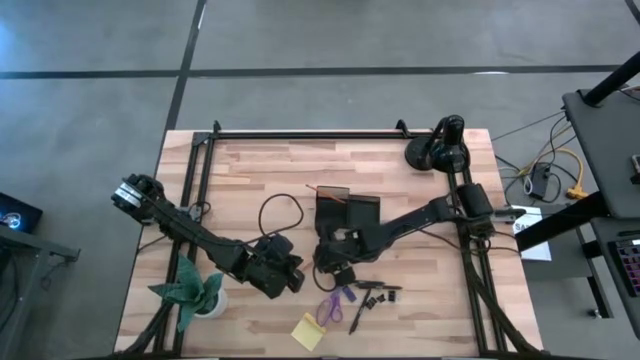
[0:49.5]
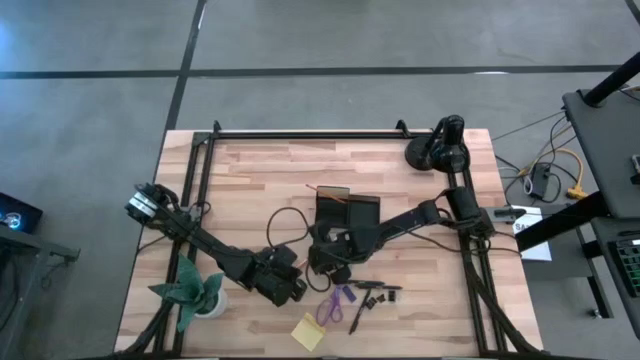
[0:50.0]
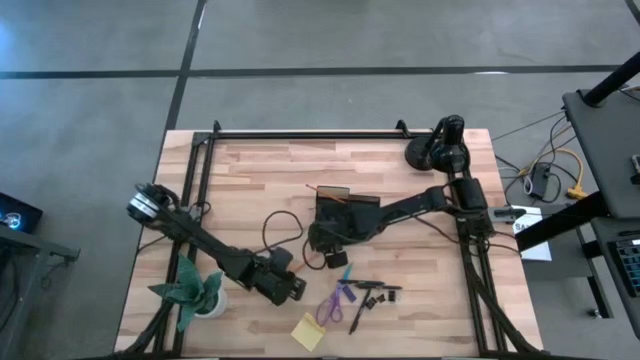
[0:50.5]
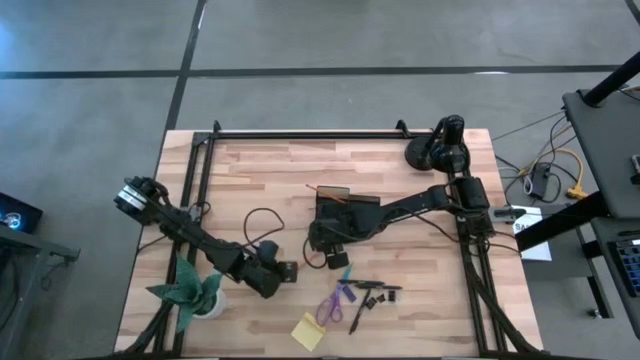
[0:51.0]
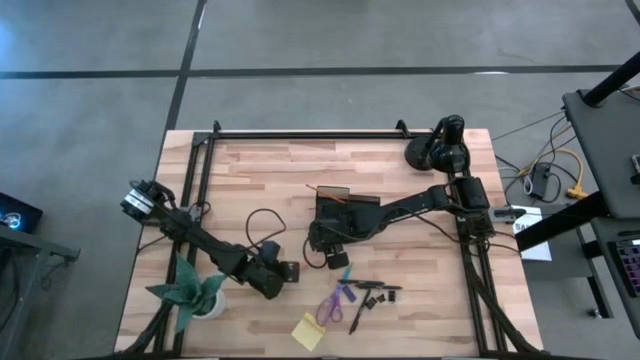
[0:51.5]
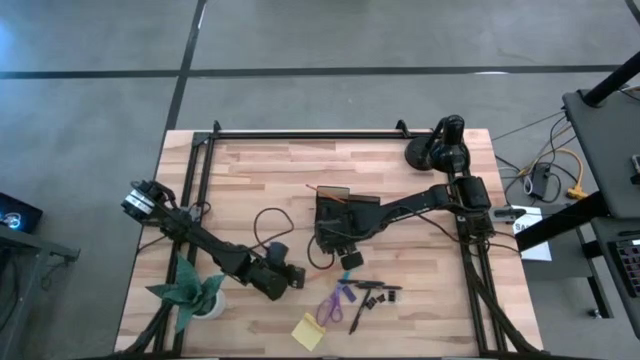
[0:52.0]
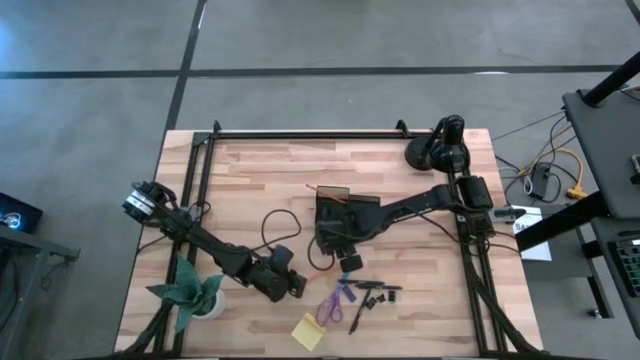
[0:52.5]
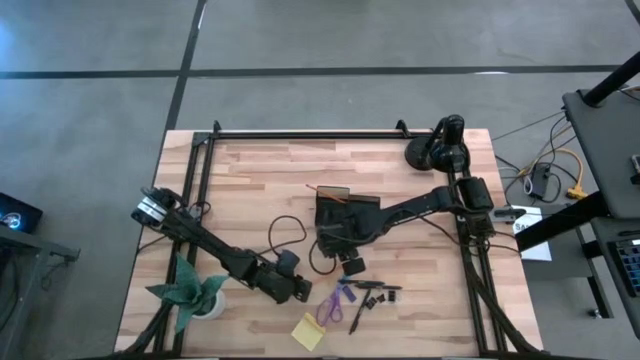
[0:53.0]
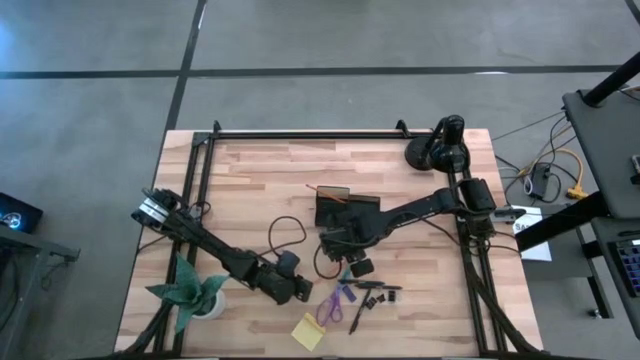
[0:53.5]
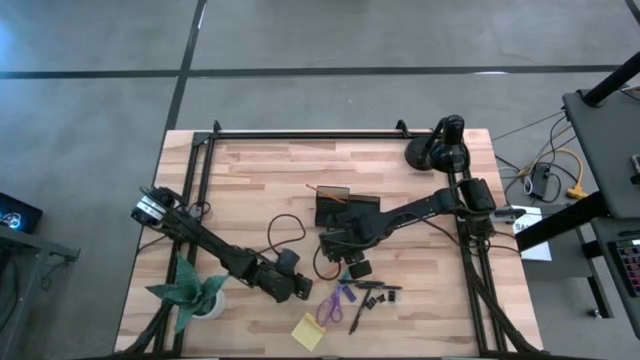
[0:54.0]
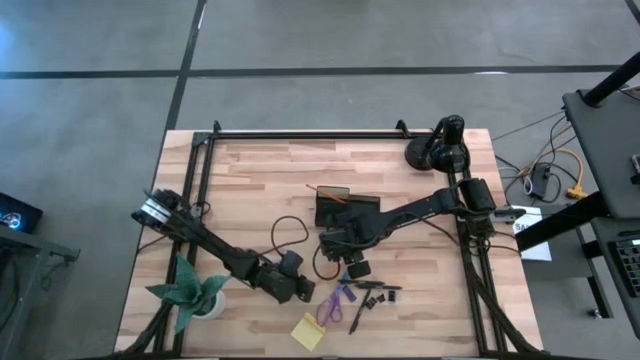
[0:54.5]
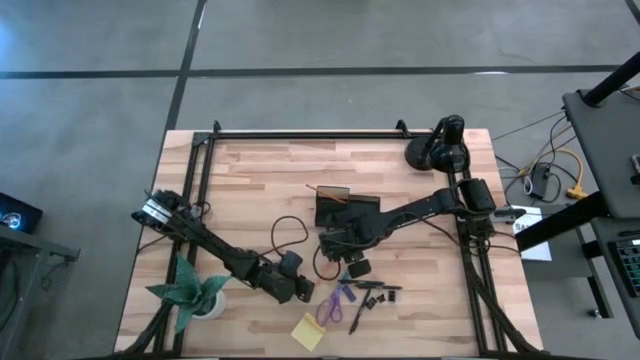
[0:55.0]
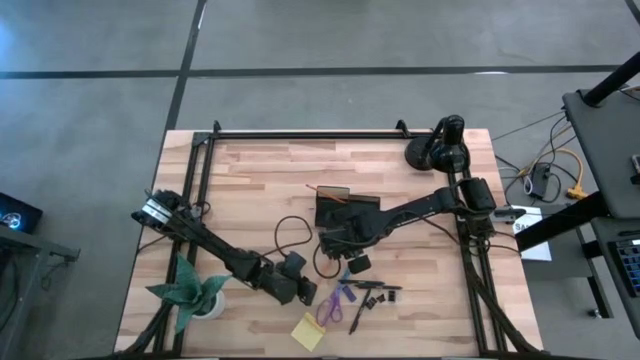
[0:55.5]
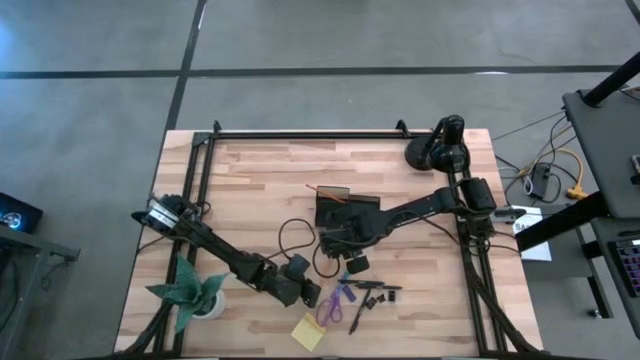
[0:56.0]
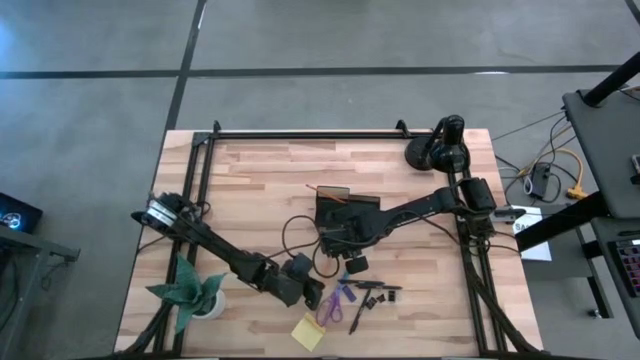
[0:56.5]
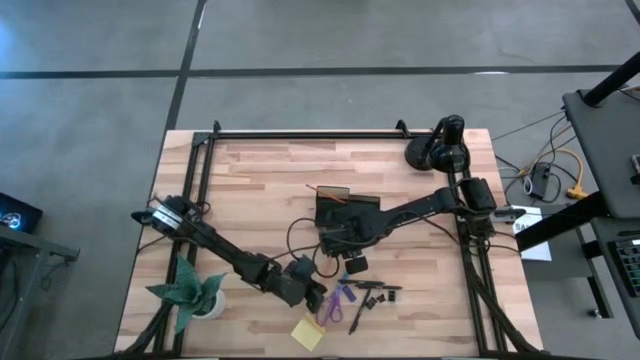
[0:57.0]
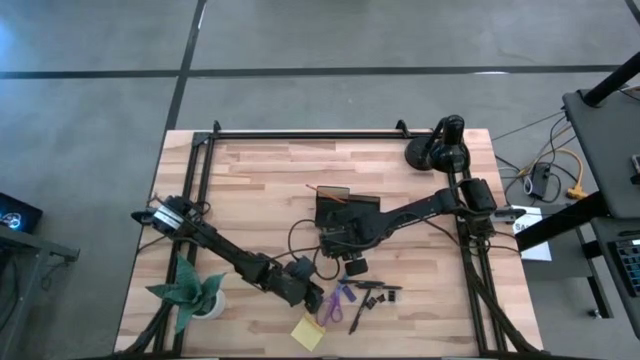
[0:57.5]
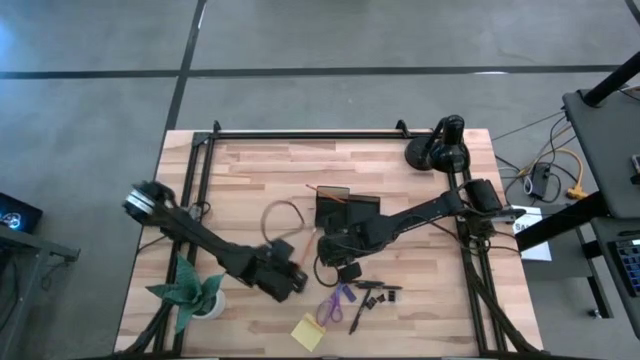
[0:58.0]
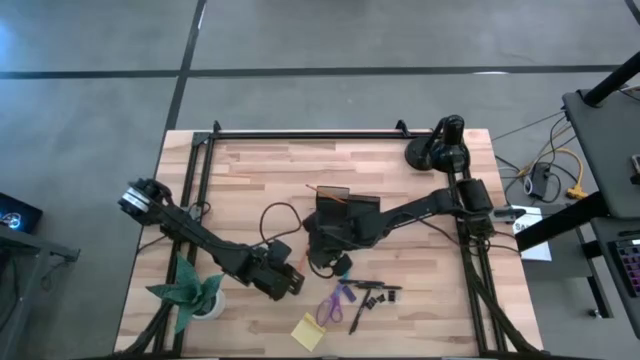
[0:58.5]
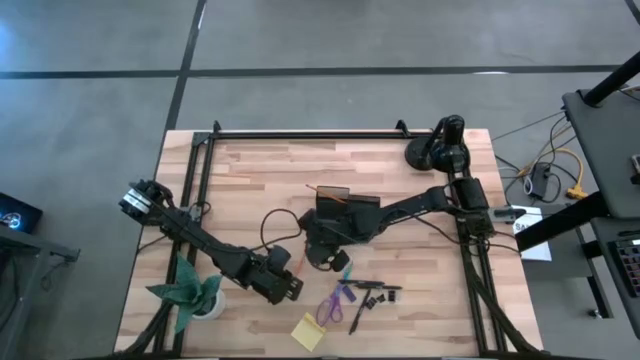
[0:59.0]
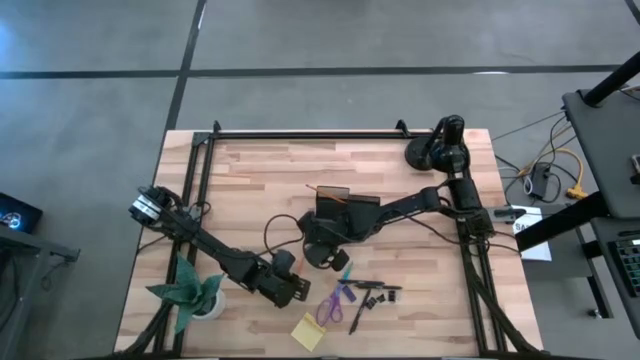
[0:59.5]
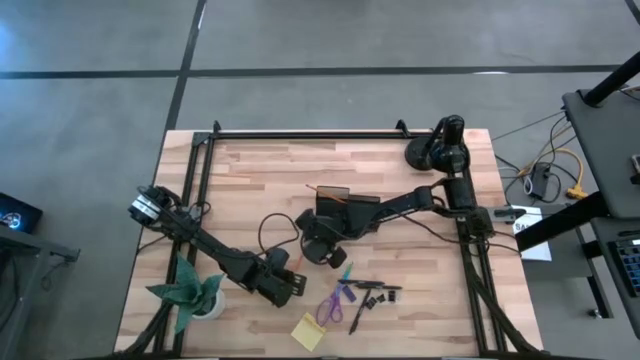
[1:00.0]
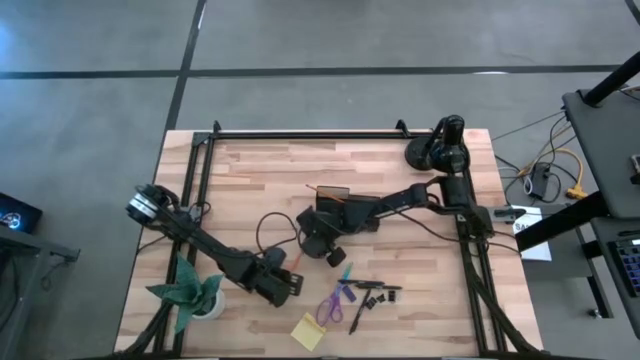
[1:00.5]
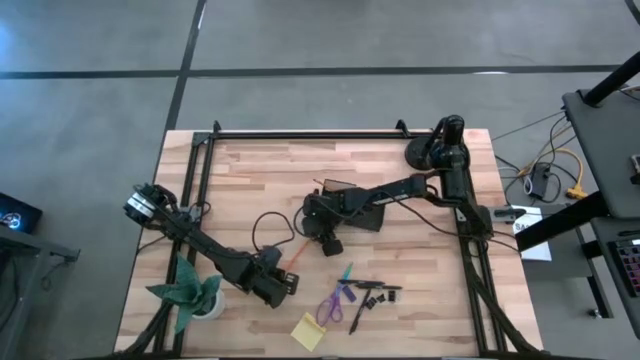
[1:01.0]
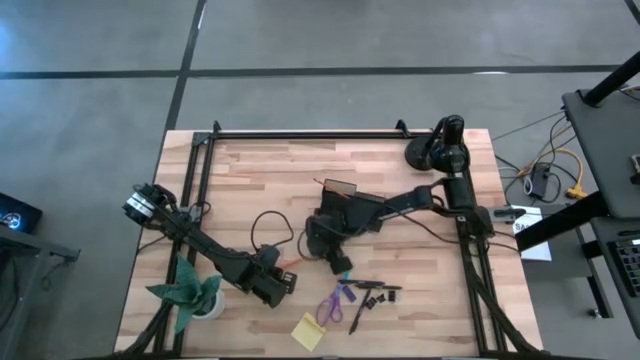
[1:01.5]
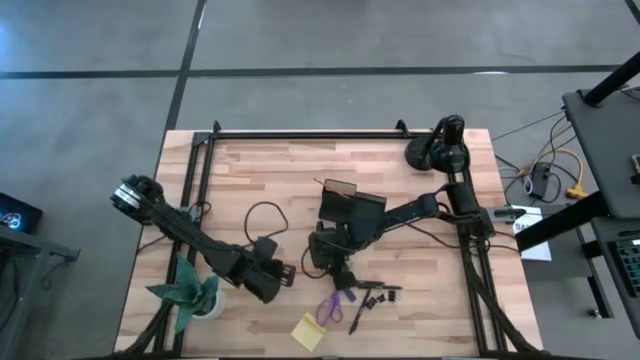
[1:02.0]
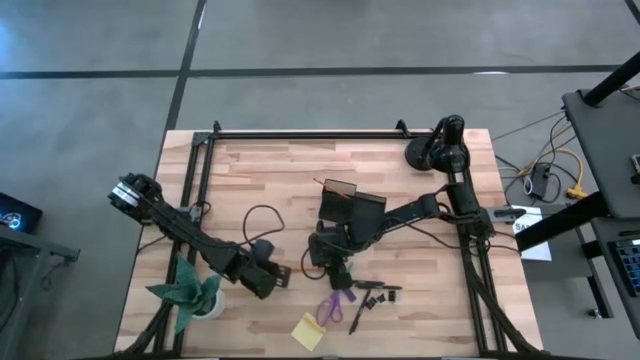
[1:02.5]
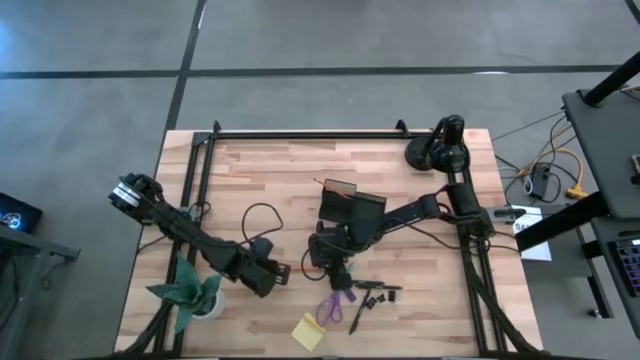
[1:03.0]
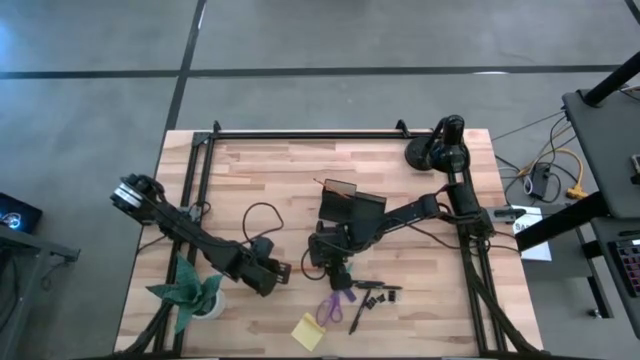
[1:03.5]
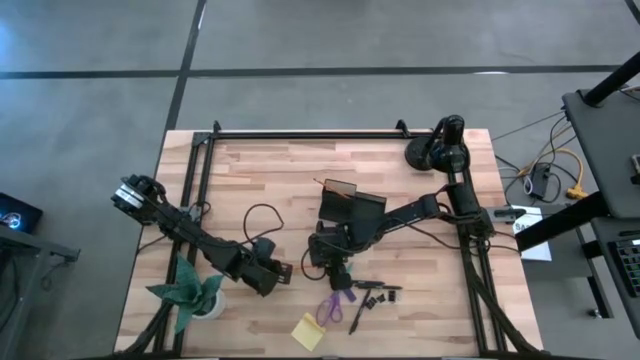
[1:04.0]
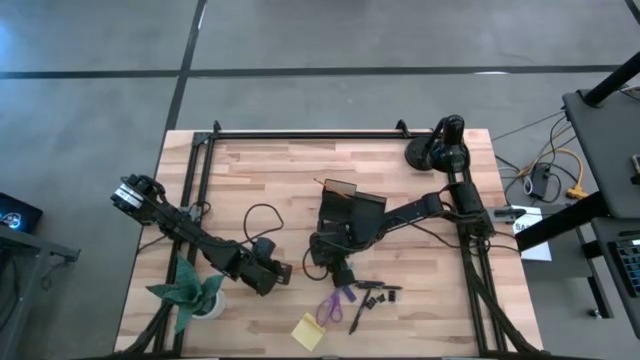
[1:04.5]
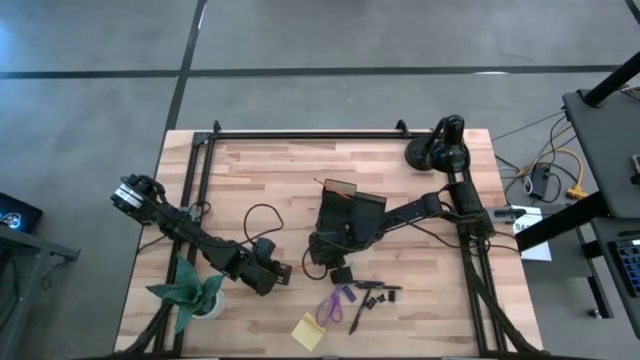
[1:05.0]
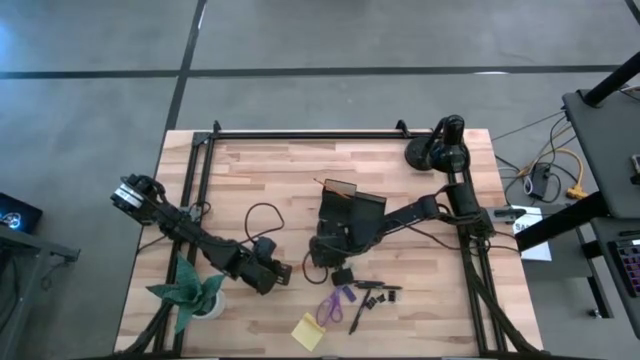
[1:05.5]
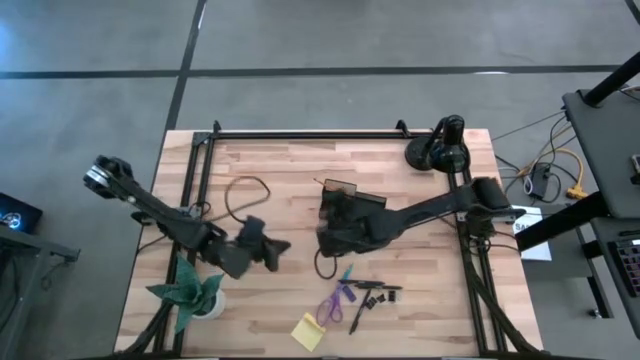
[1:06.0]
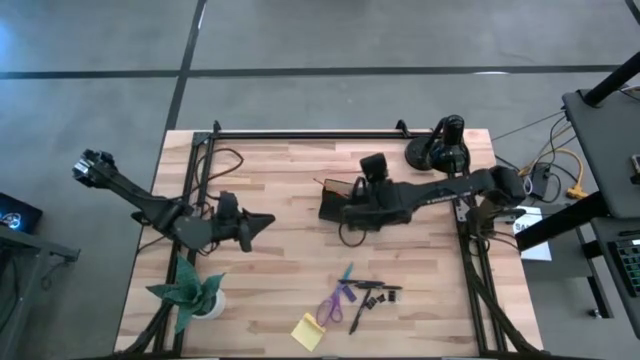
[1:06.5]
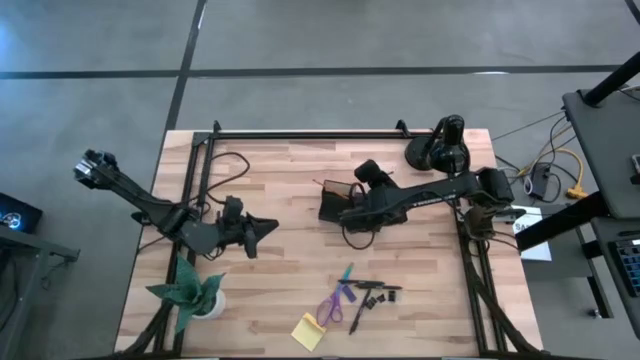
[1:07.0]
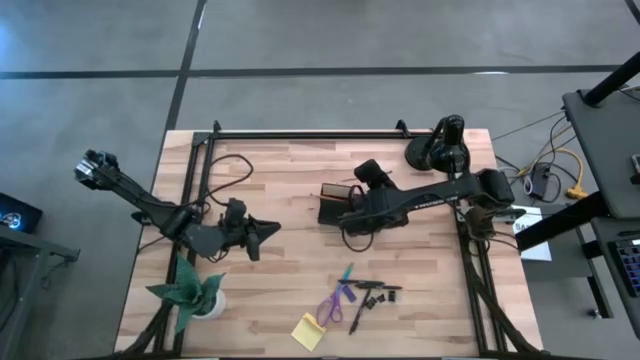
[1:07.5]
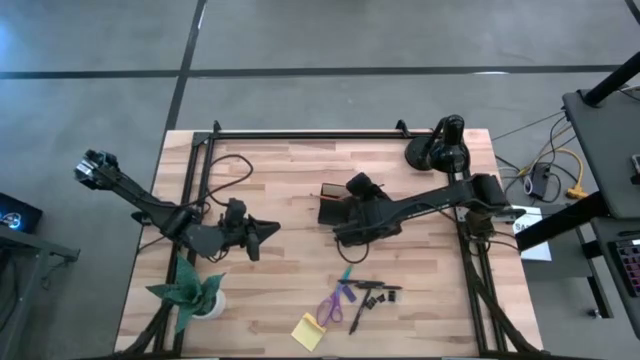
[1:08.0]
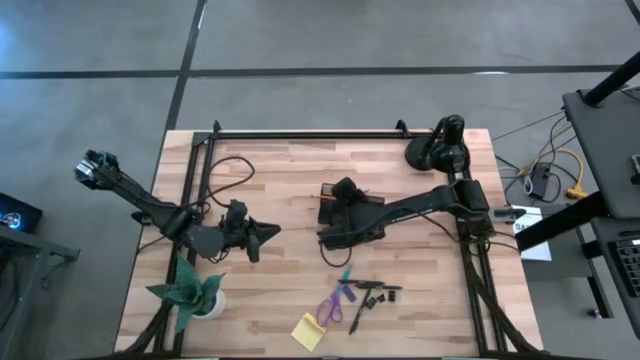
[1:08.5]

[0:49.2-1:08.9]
Task: Pick and place office supplies into organizer
Put the yellow pencil into the black desk organizer

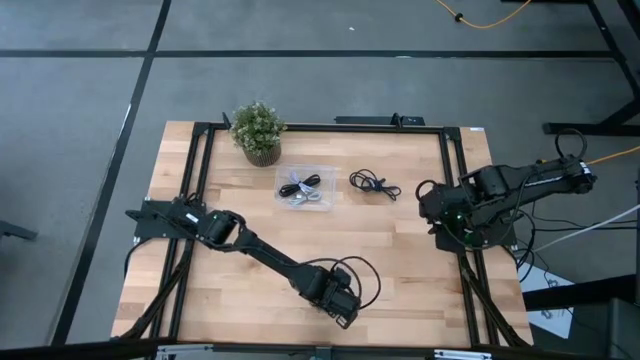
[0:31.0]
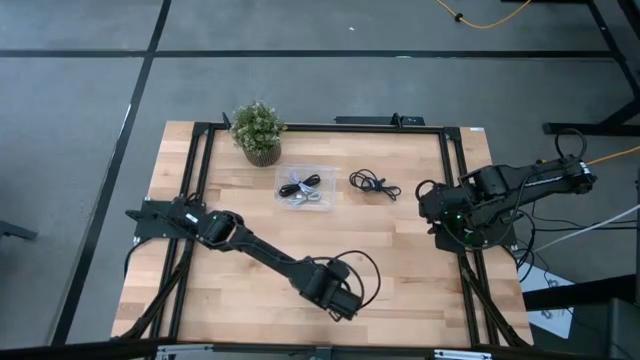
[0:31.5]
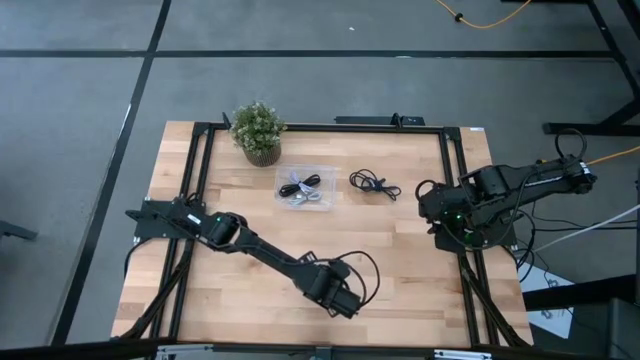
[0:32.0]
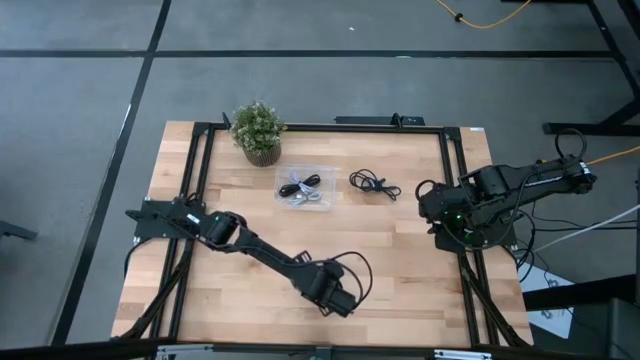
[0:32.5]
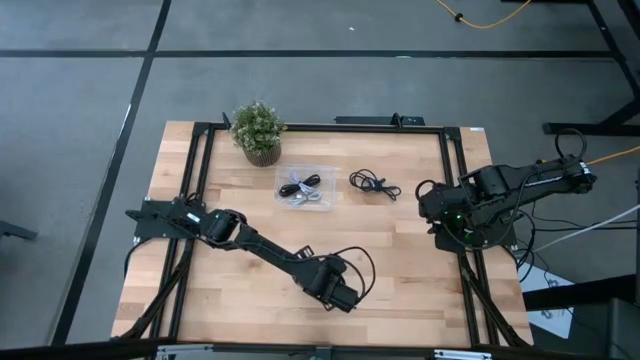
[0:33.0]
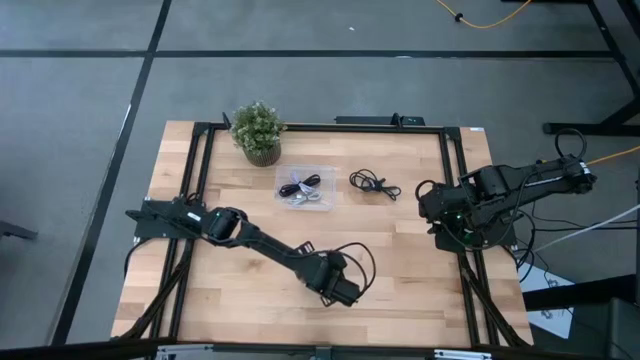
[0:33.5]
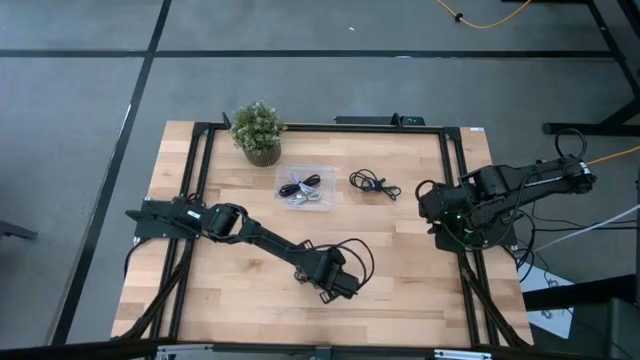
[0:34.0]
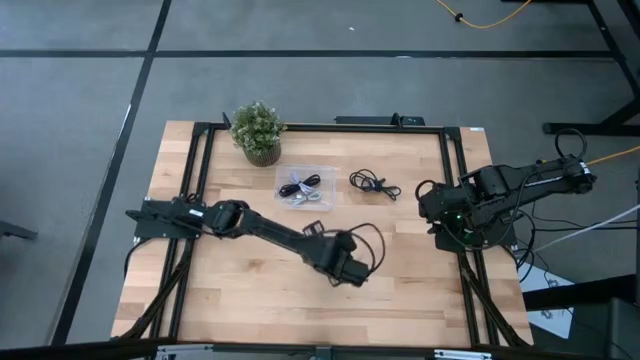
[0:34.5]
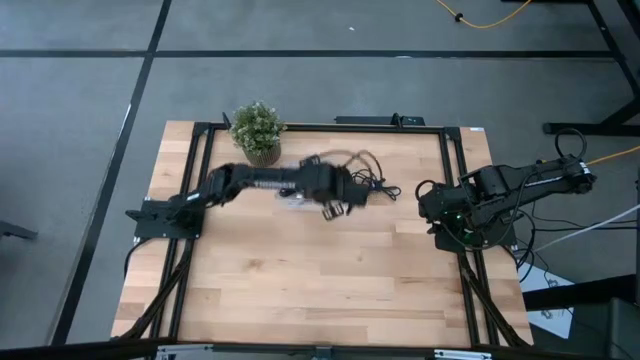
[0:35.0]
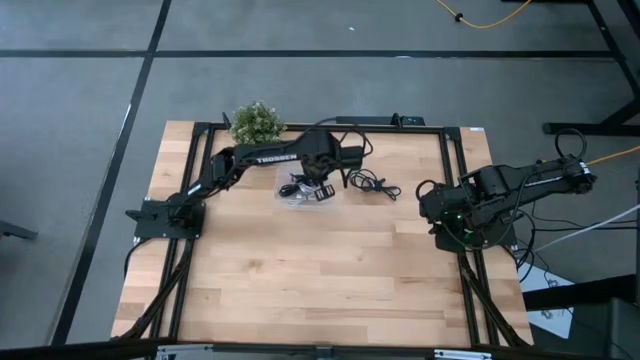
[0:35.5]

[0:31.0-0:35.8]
Task: Pick and place USB-C Cables
Put the bottom black charger cable into the transparent bin
